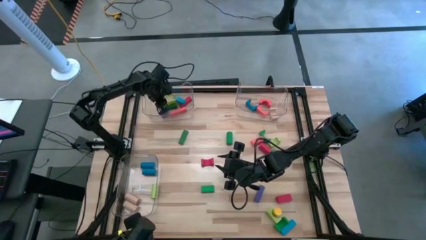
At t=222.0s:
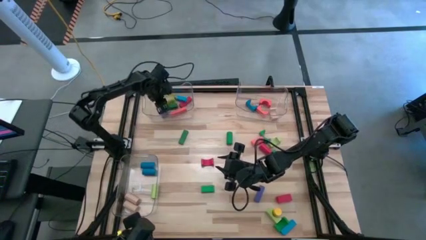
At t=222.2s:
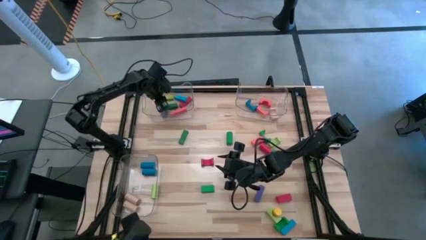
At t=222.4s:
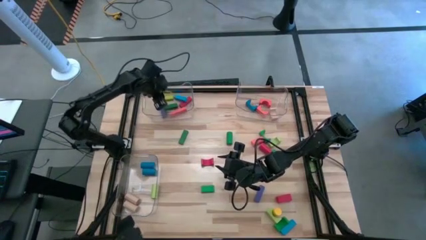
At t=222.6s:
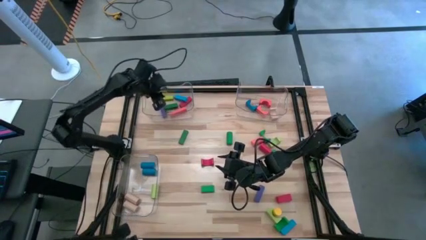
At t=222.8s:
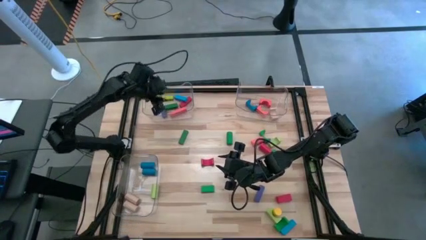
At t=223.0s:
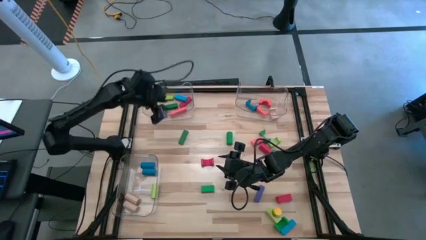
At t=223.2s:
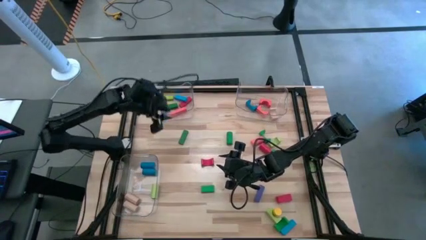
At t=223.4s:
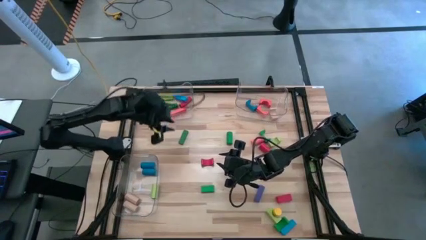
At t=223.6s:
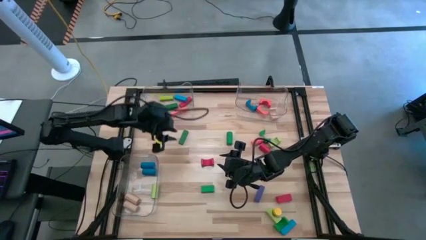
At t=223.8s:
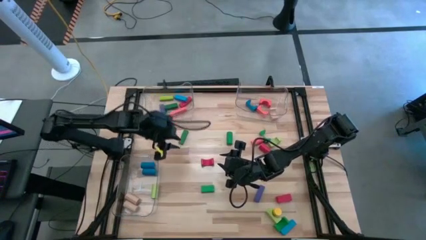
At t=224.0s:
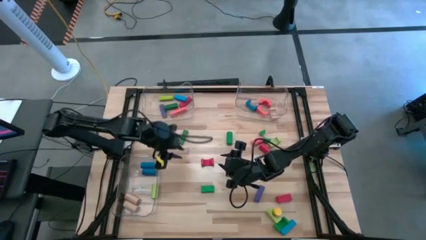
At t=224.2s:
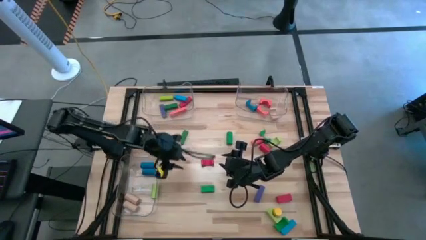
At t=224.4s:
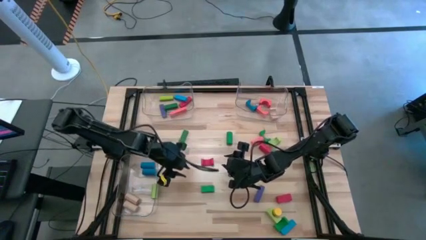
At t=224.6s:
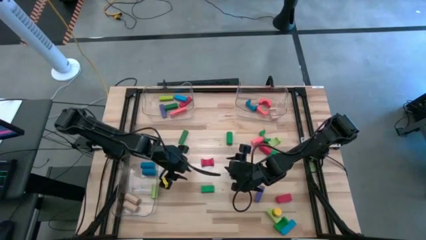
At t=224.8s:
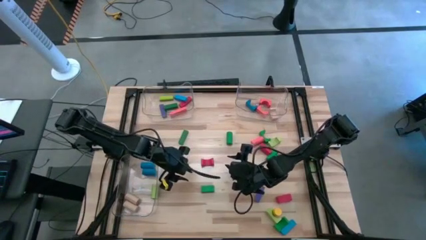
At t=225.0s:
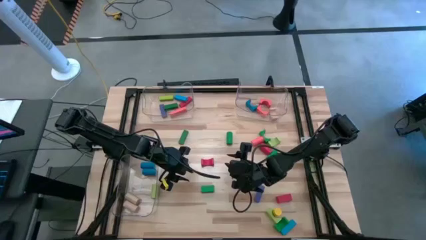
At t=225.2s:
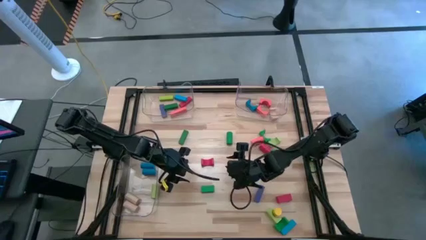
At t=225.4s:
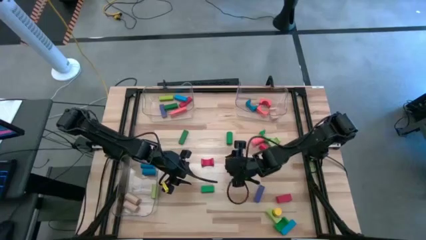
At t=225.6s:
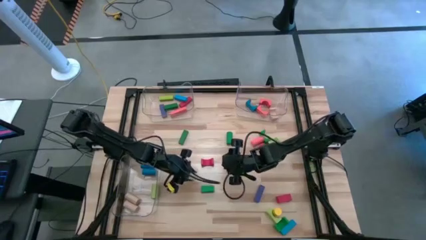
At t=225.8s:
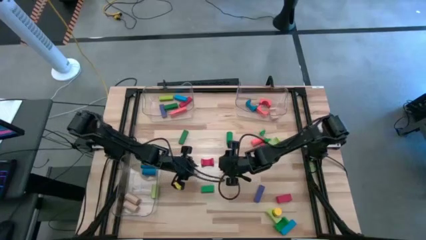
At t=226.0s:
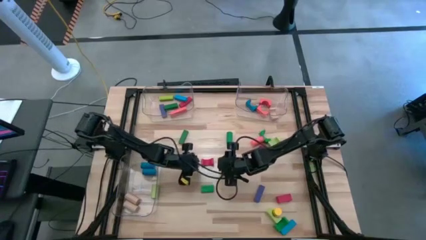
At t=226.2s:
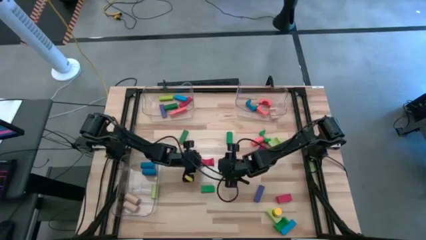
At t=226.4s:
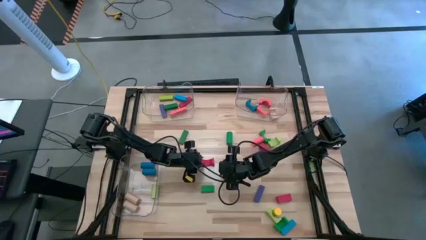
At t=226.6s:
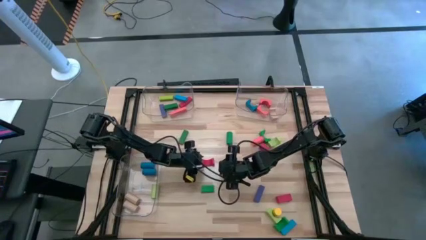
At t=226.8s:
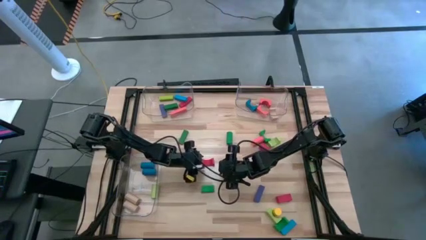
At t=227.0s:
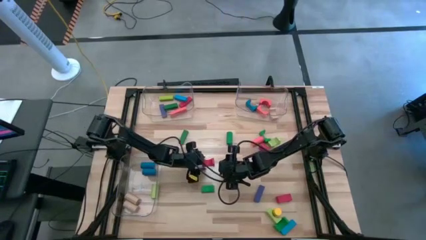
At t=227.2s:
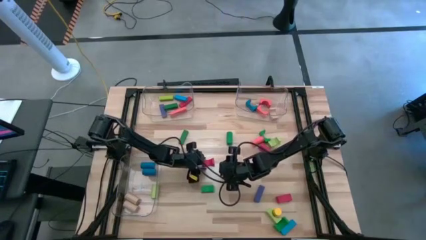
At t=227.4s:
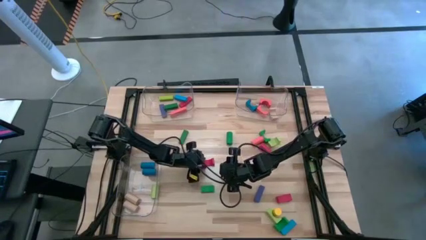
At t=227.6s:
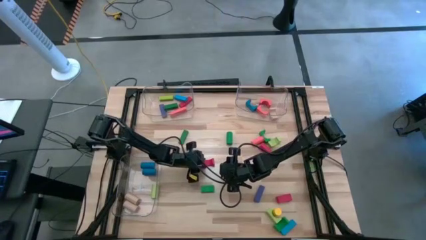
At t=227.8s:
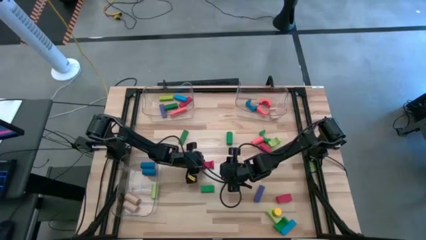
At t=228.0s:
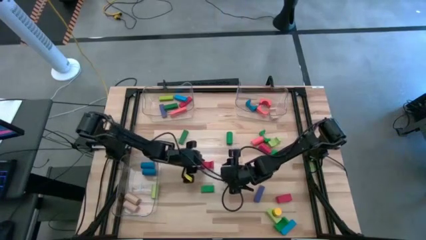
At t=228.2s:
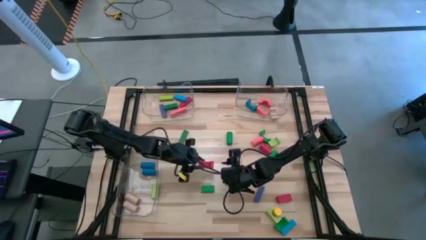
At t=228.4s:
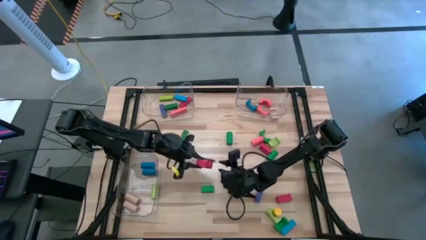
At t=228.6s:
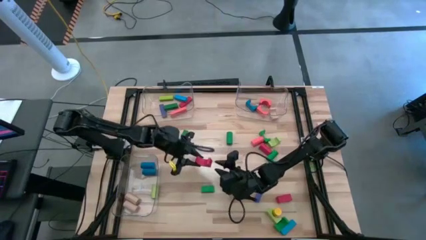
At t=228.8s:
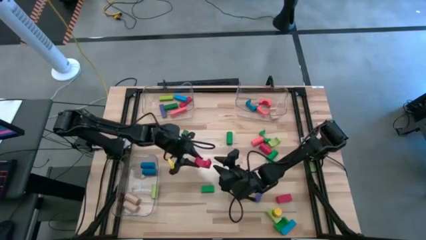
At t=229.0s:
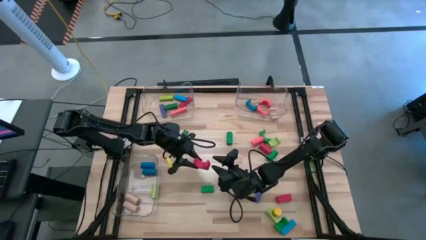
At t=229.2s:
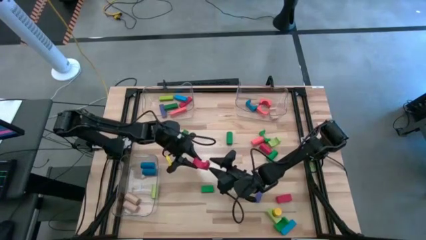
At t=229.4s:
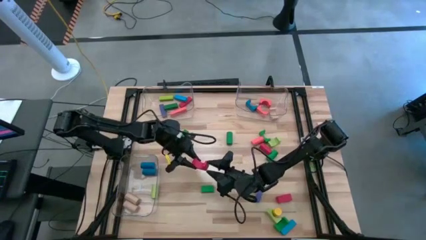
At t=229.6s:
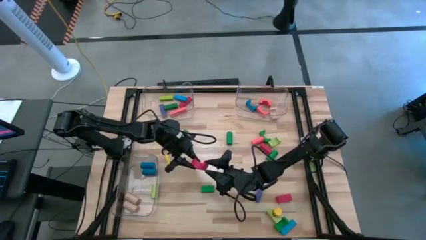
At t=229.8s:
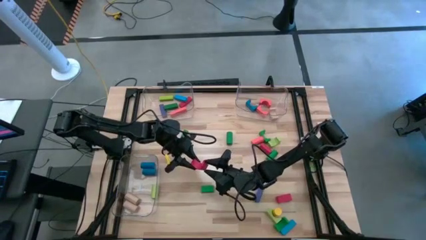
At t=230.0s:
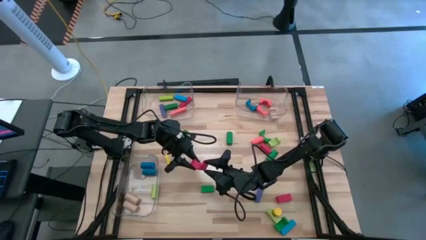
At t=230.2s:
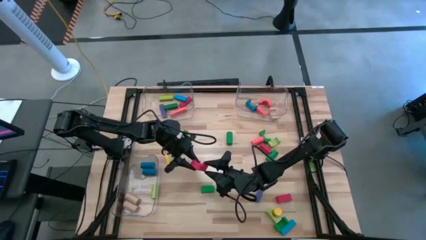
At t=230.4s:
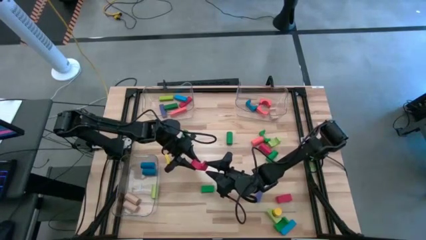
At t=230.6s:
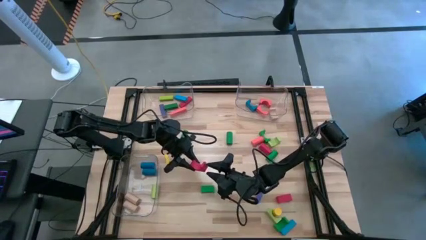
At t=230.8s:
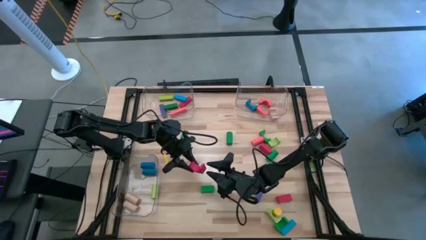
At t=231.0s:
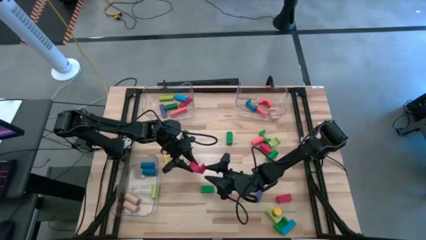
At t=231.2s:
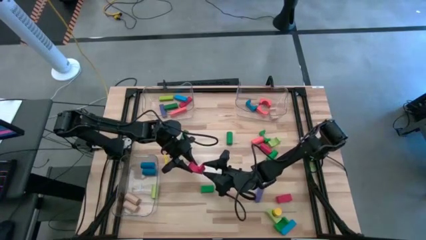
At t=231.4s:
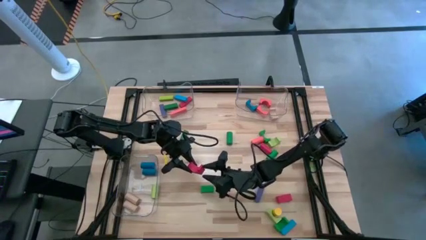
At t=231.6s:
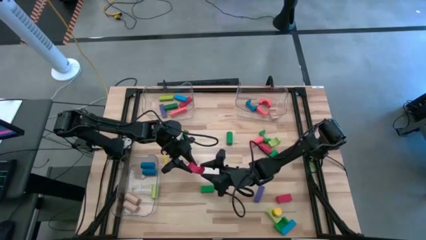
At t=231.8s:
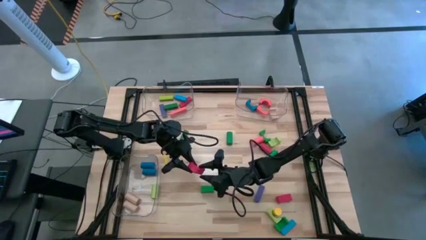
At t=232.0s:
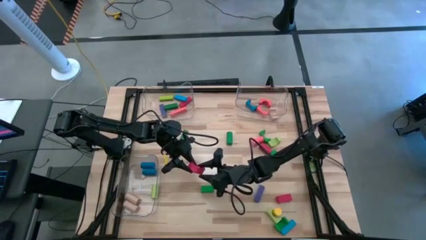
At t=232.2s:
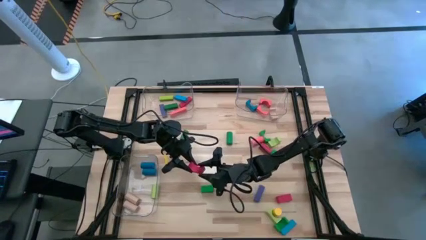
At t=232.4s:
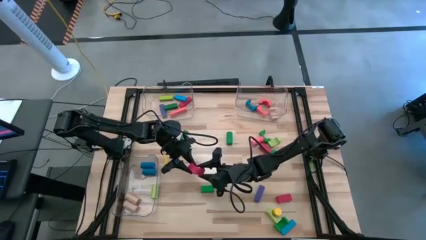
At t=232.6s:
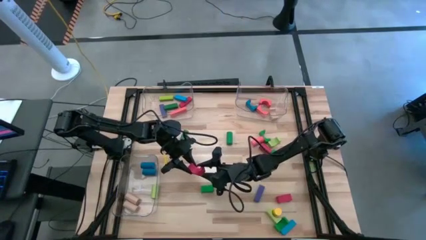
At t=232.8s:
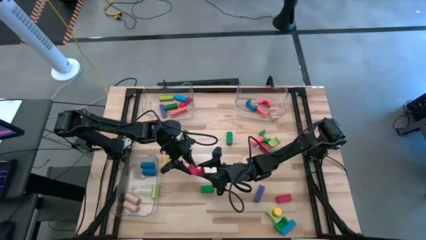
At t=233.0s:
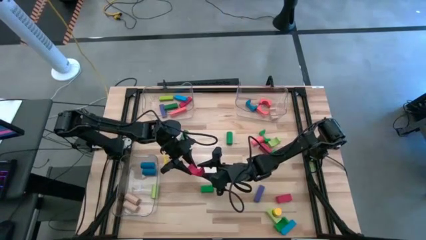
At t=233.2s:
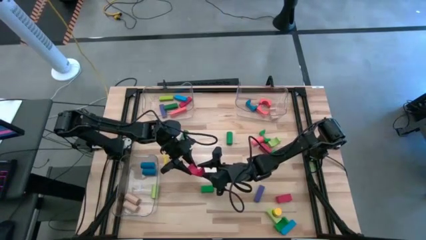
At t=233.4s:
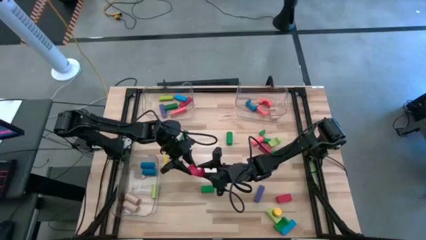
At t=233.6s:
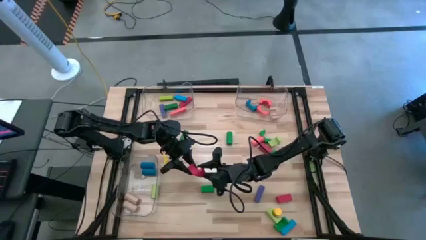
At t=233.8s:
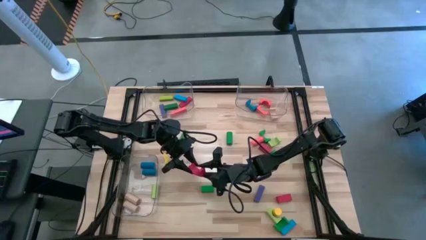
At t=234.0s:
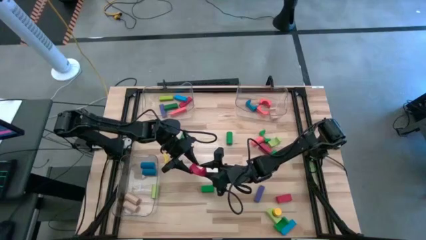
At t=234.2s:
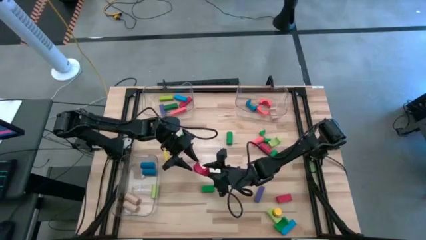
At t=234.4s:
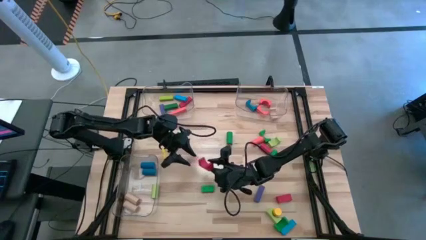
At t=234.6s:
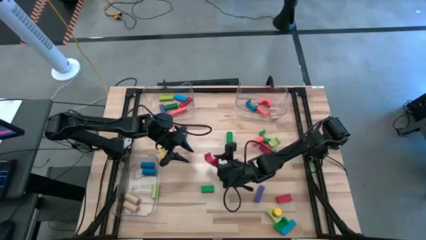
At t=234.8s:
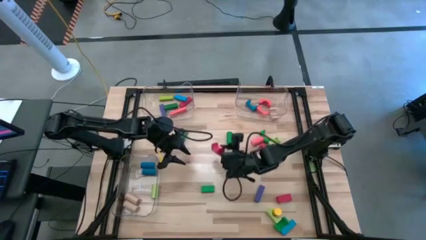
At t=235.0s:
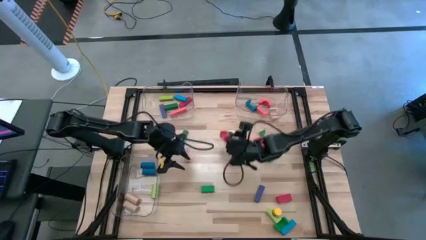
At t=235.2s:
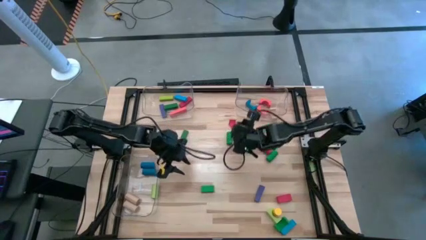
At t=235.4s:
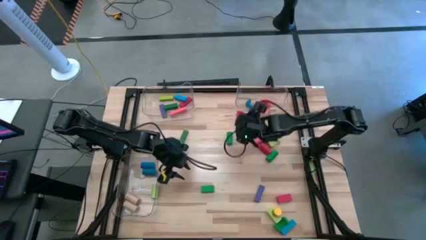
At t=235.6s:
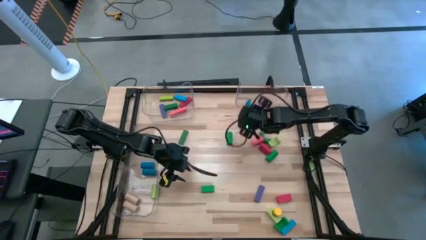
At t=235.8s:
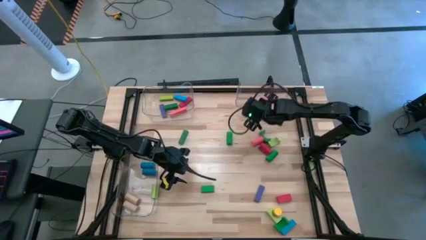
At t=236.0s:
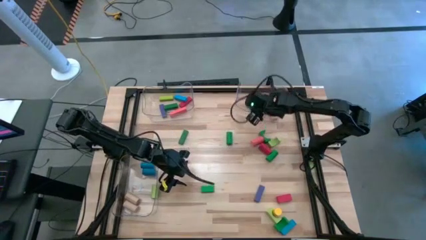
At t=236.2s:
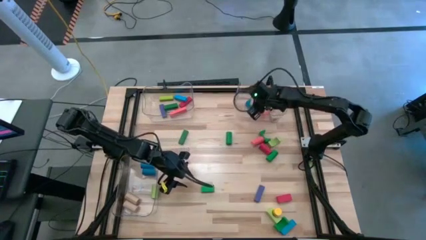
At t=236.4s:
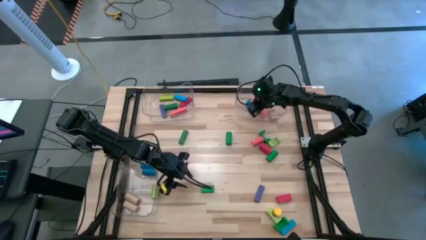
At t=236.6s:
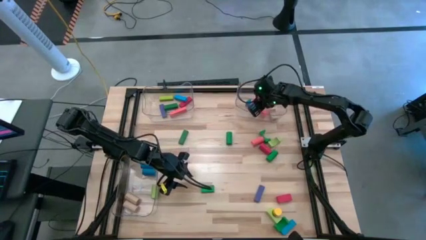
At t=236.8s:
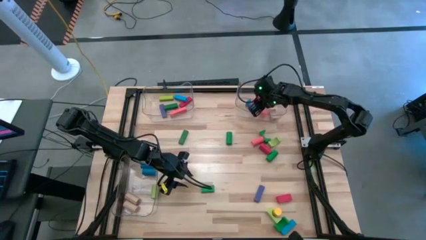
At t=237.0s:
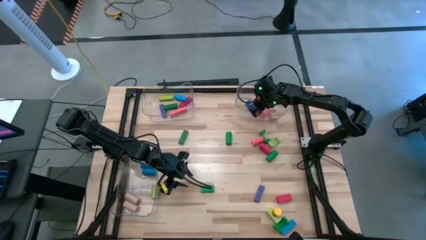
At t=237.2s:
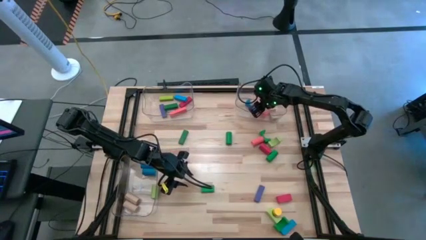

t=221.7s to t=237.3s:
Task: Sort blocks by size
Put the red arch block into the top right transparent bin

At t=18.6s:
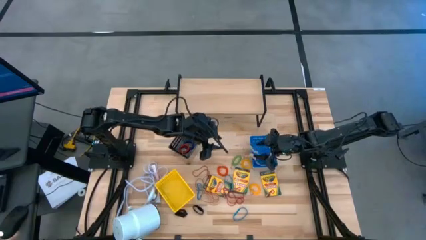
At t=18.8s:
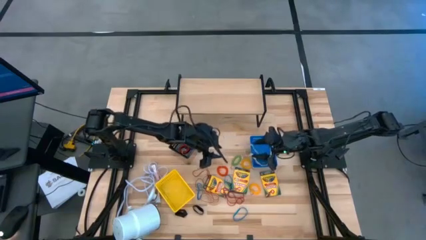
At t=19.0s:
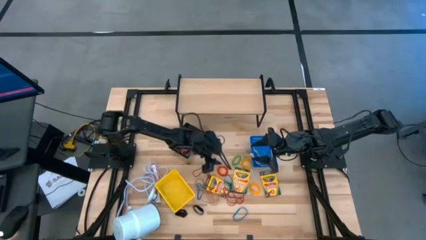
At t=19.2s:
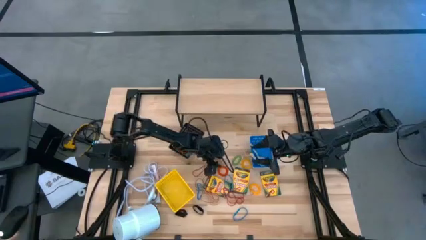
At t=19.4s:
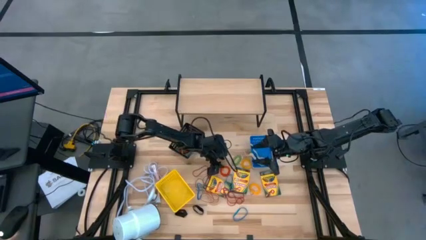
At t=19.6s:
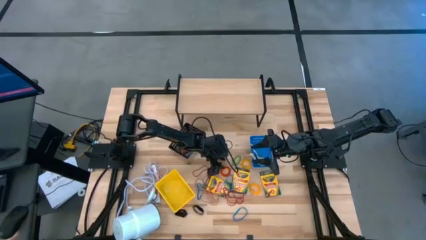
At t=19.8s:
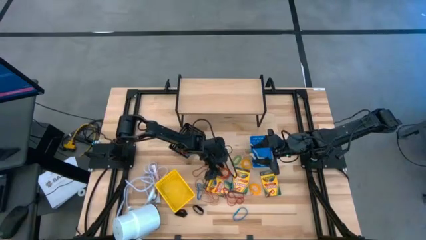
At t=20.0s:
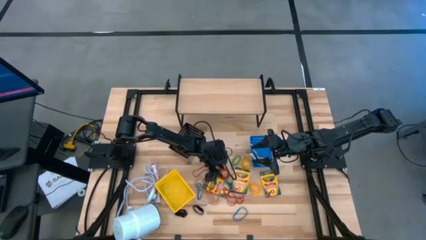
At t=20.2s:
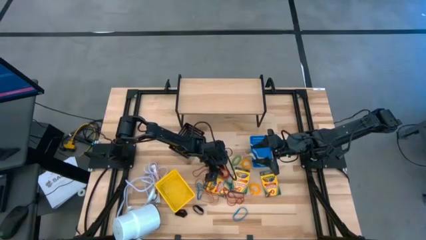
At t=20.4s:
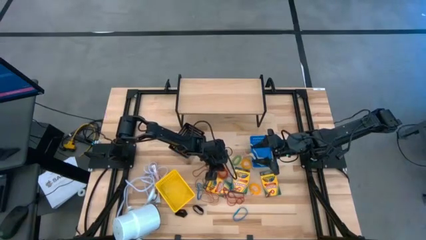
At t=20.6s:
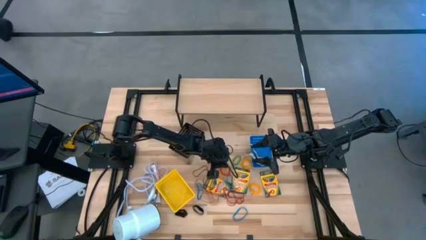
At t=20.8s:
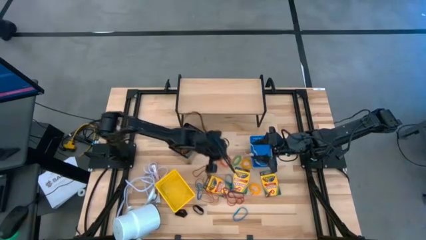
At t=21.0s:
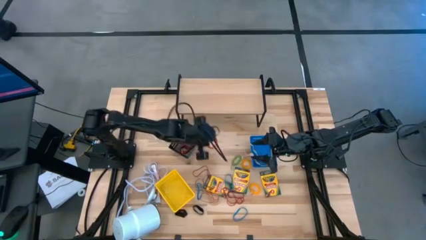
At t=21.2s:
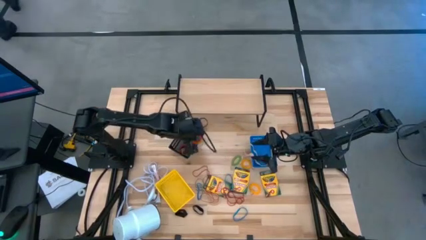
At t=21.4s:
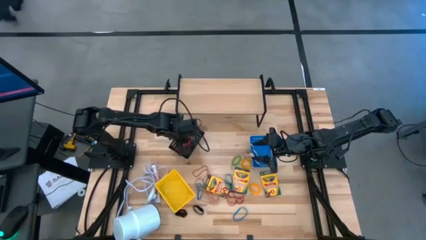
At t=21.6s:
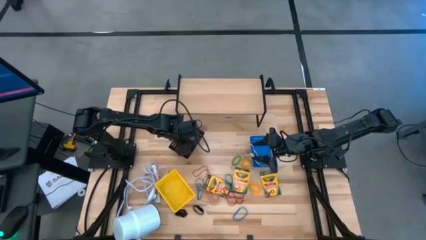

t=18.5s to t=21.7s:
Task: Pick & Place Office Desk Supplies
Put the orange spring keychain into the black bin
